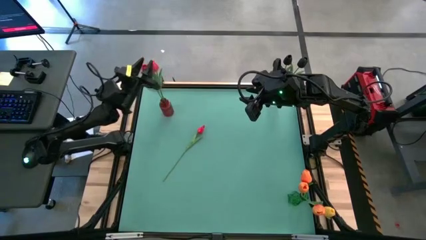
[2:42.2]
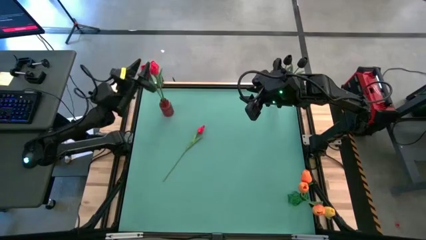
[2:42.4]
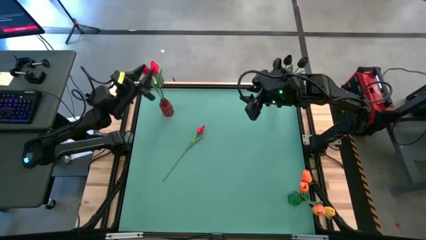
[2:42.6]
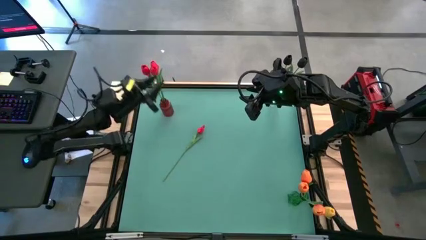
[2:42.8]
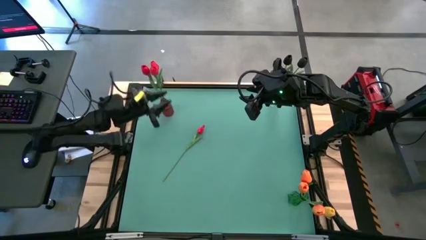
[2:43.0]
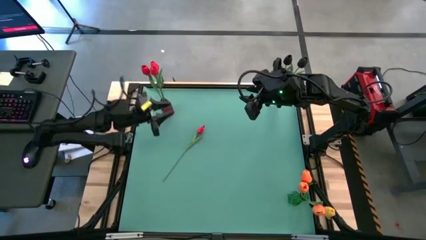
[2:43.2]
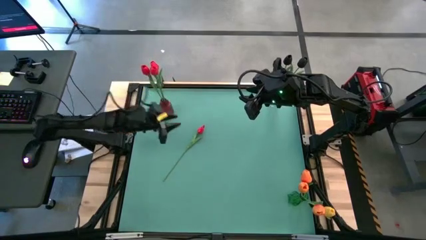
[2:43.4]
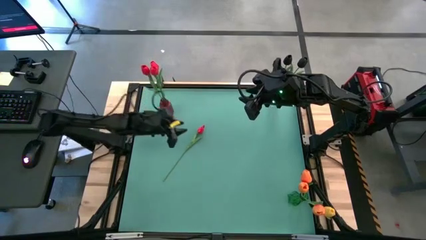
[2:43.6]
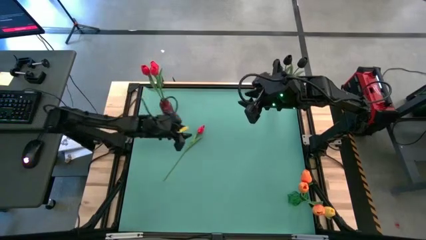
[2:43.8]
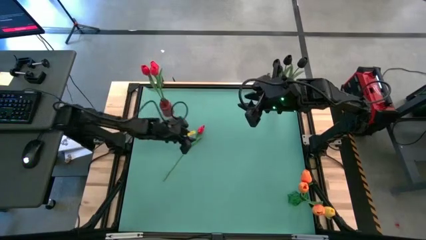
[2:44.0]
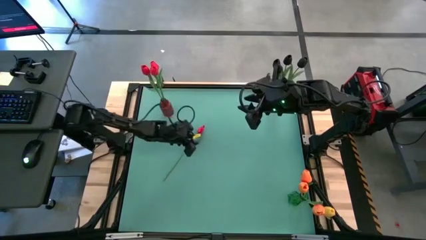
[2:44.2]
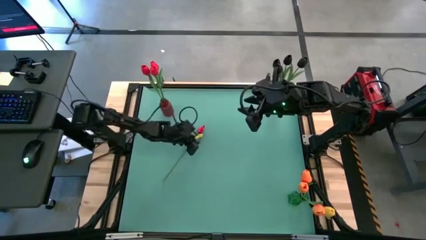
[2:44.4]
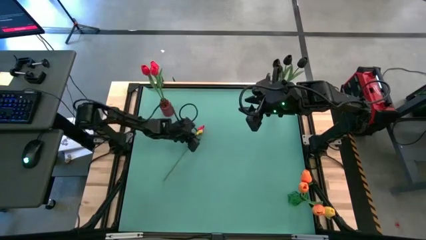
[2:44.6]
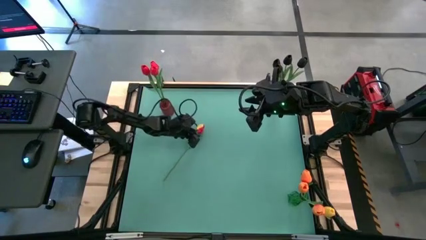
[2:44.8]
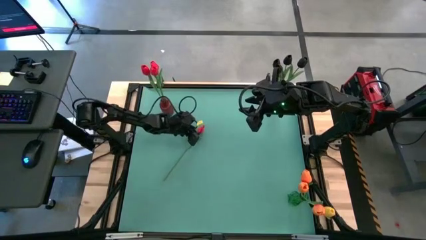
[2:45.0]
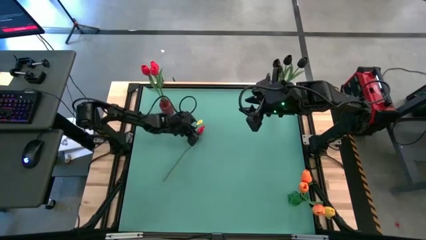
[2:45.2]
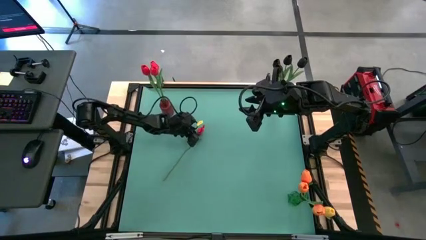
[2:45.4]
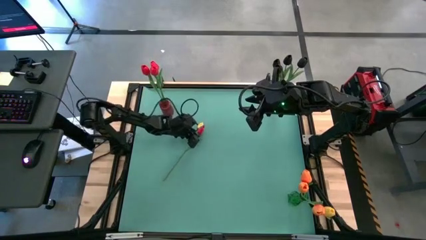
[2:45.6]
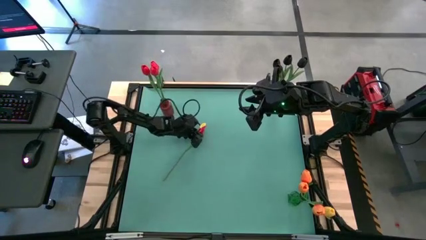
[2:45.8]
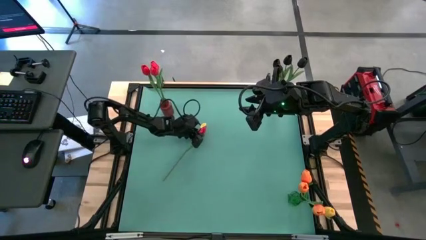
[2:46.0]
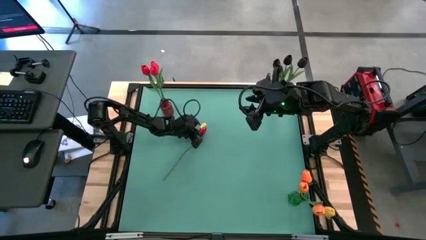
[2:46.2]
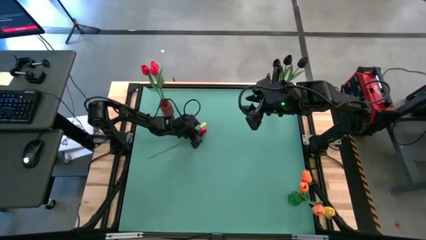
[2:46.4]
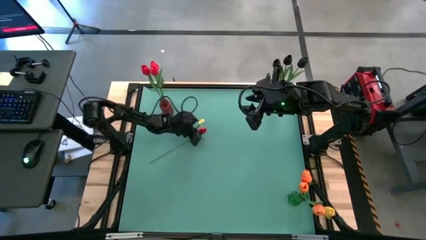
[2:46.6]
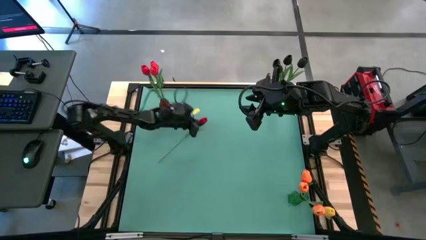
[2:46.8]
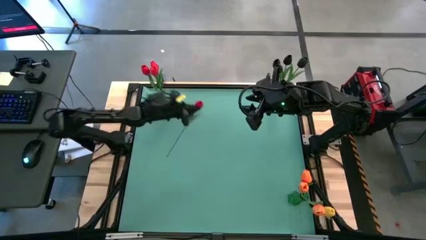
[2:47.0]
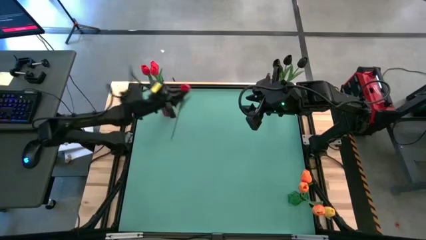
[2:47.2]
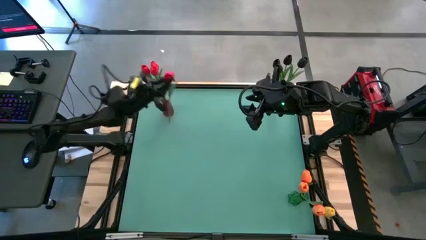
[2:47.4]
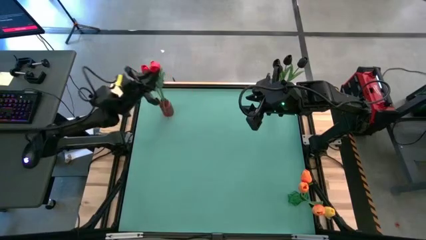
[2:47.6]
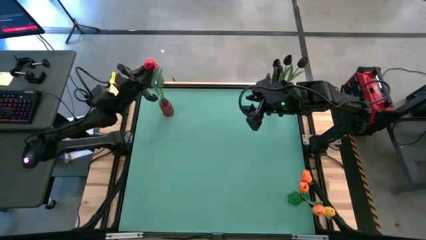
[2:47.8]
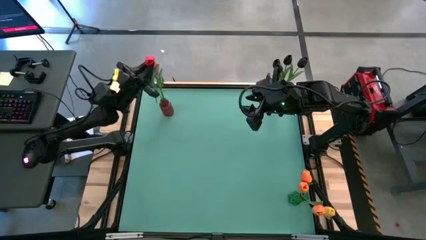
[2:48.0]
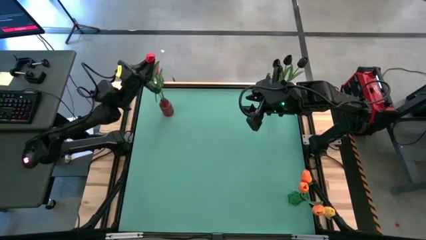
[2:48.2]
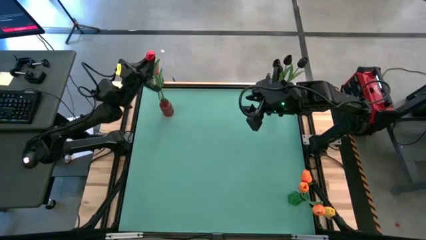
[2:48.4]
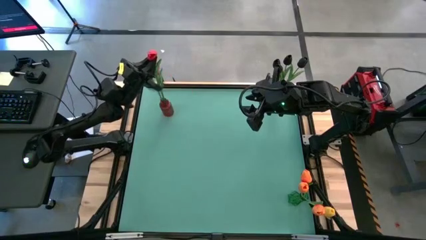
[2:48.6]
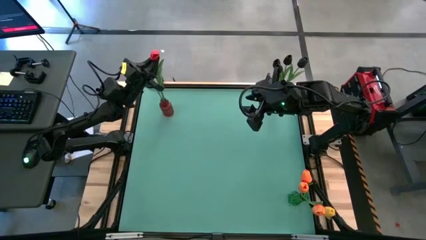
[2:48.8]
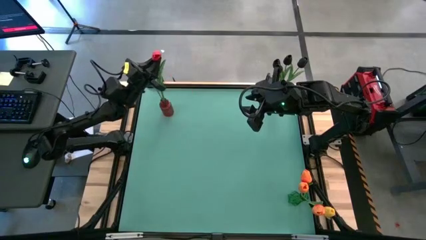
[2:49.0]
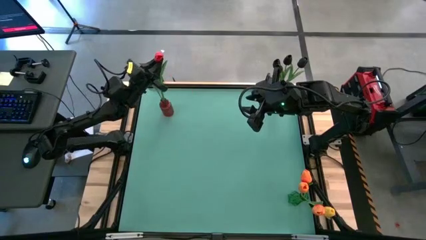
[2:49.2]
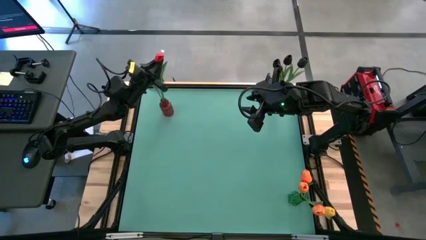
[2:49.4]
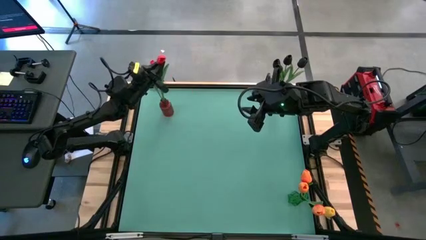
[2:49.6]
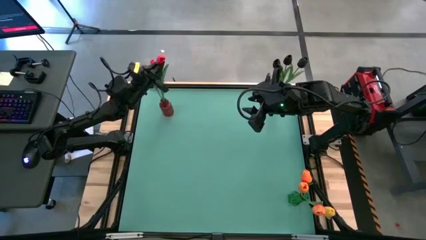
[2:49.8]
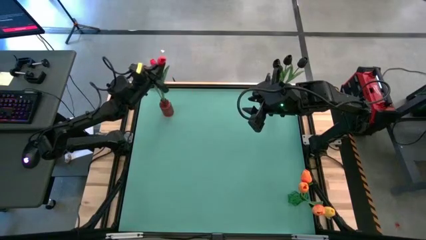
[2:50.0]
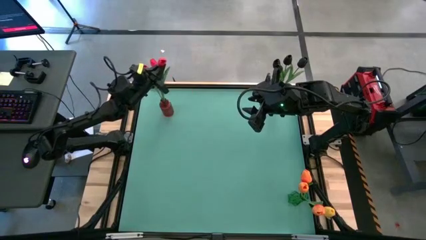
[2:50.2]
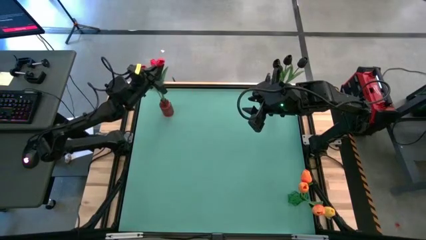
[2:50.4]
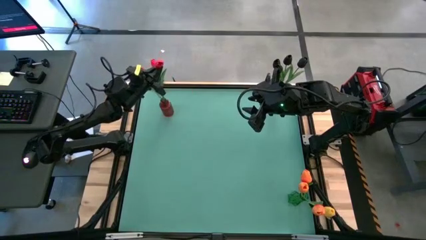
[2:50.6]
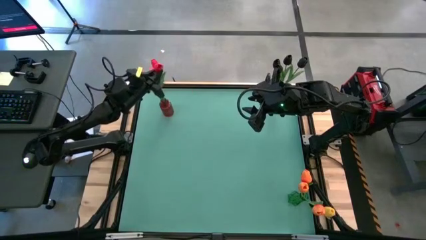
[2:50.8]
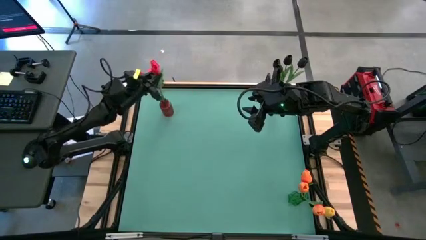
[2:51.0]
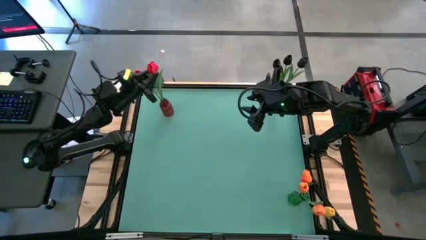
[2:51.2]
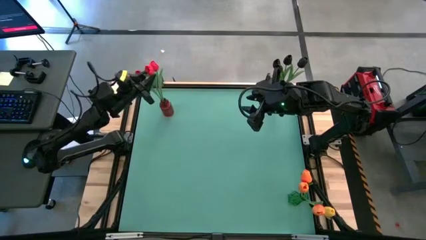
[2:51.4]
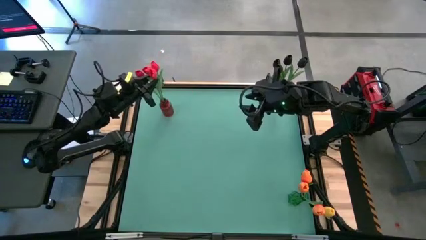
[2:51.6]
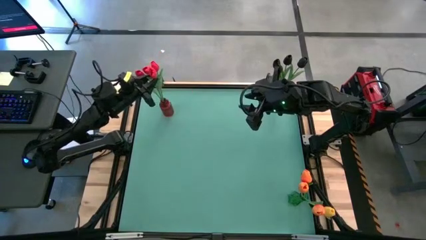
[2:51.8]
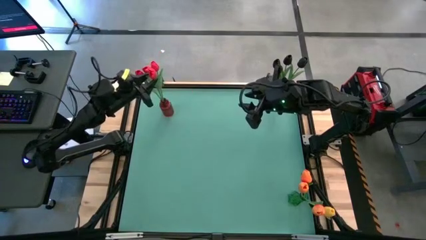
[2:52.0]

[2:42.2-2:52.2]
Task: Sort flowers into vase by color
Put the red tulip into the red vase

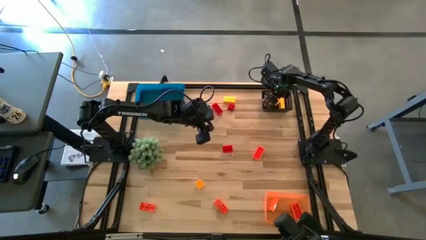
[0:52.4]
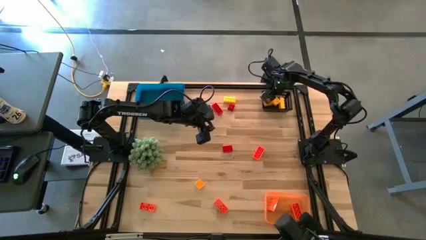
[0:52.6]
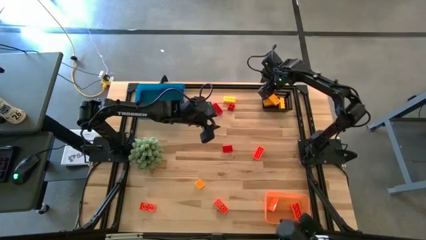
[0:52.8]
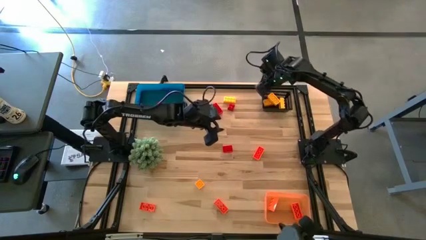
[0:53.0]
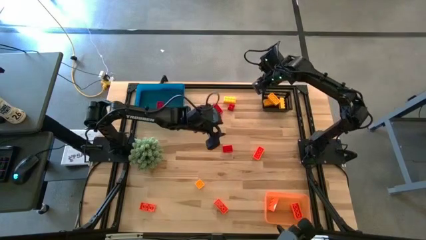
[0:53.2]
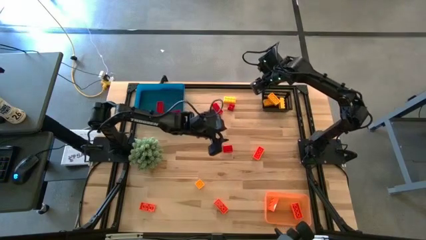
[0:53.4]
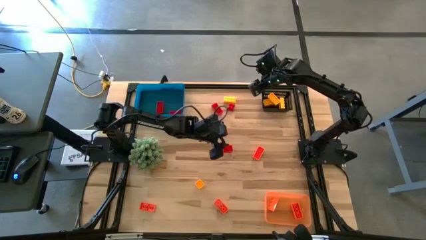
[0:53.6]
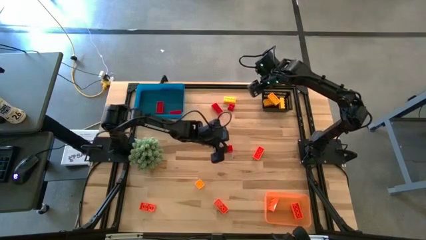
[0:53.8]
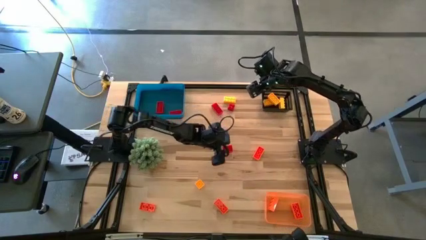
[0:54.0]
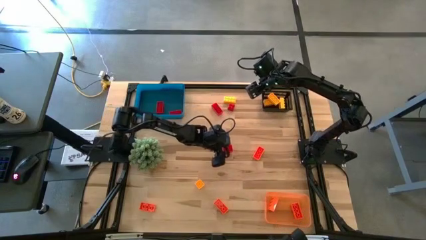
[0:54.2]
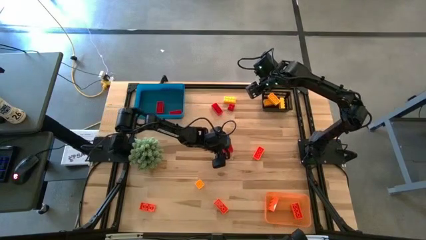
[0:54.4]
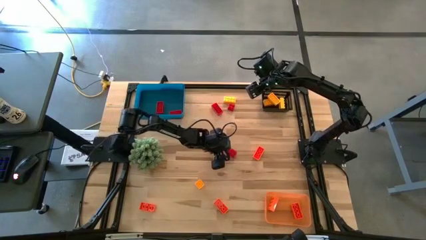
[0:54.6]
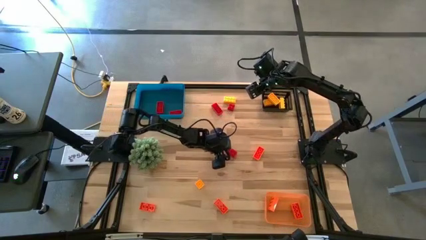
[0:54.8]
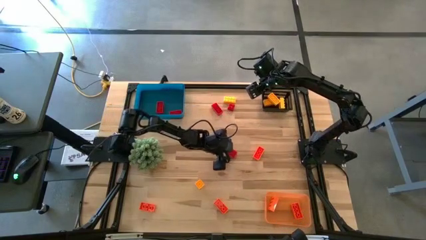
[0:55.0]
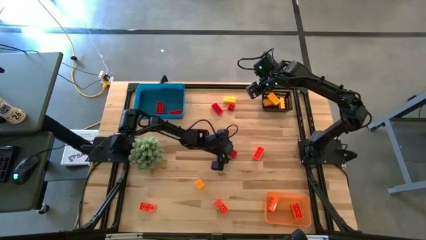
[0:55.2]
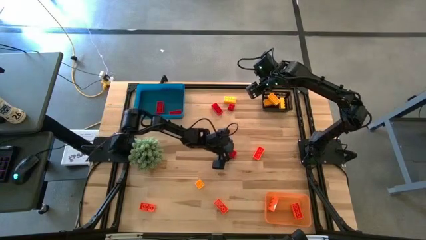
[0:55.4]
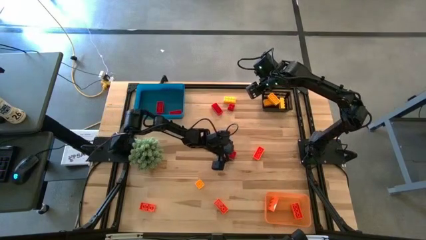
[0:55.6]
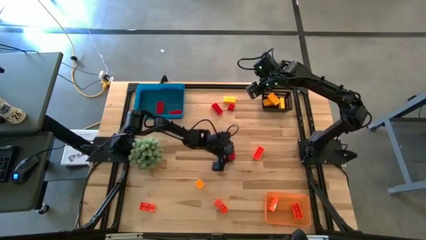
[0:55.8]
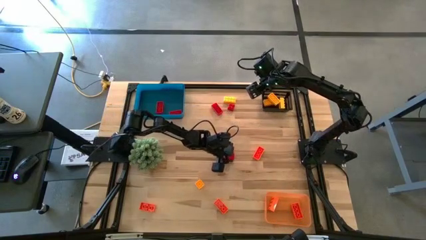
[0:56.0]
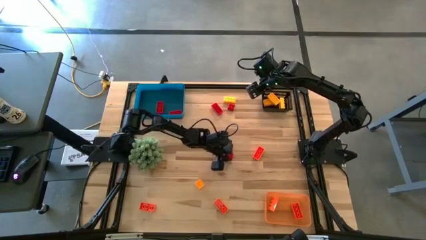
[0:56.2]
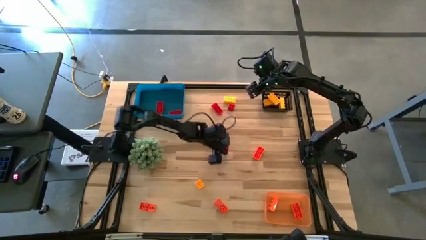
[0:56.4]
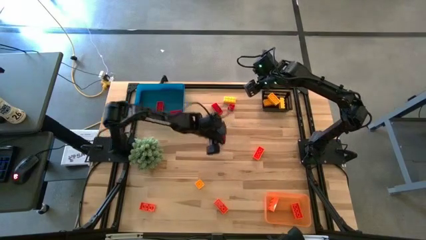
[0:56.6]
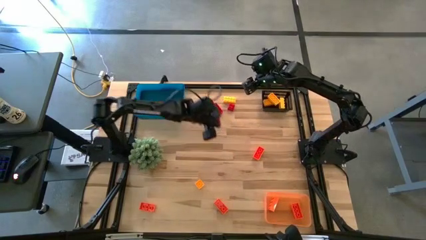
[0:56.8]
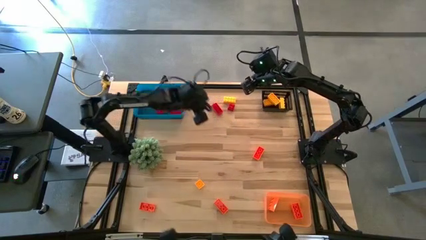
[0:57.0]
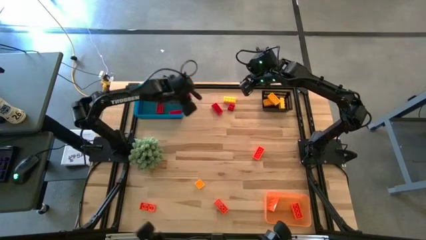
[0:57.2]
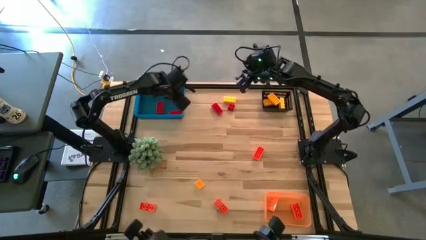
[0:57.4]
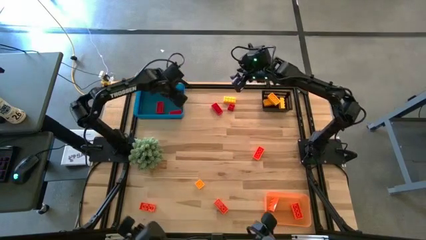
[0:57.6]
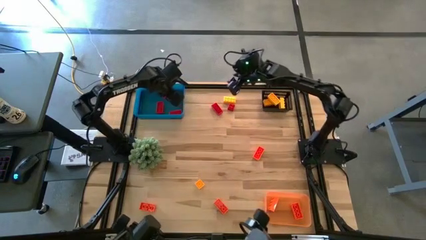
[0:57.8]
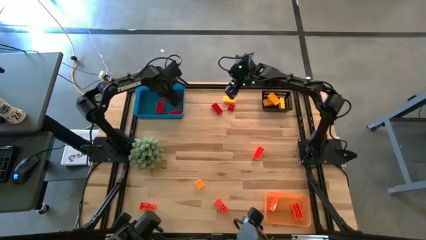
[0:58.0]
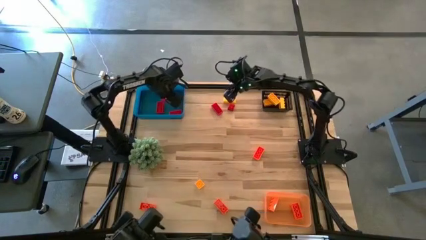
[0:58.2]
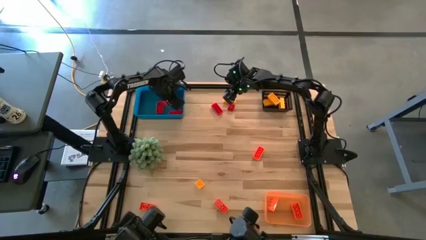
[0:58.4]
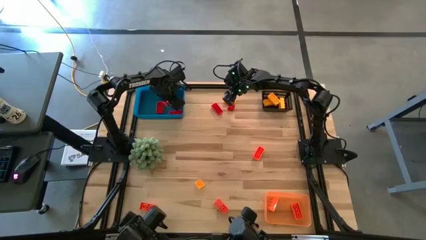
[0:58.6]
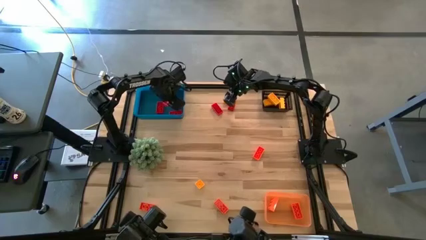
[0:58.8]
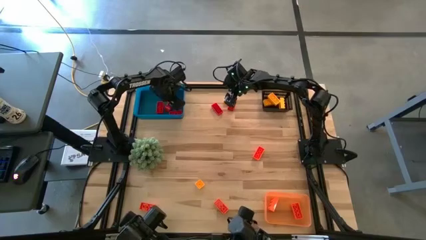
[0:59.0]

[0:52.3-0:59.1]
Task: Sort & place blocks by color
Put the red game piece into the blue bin
